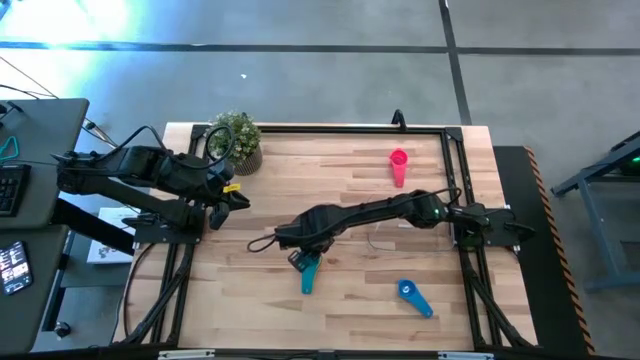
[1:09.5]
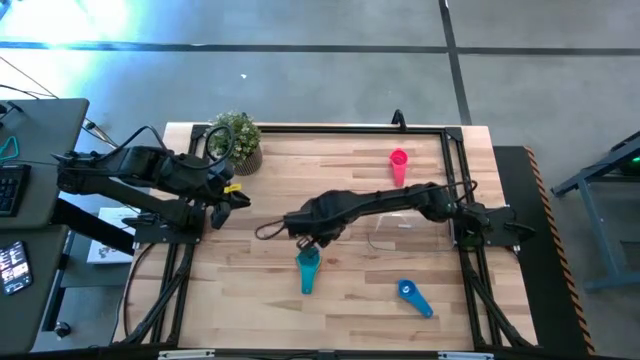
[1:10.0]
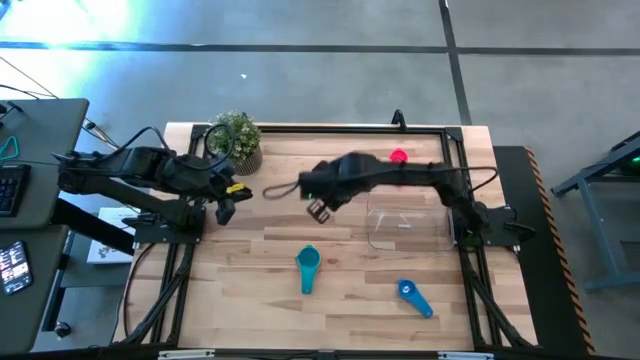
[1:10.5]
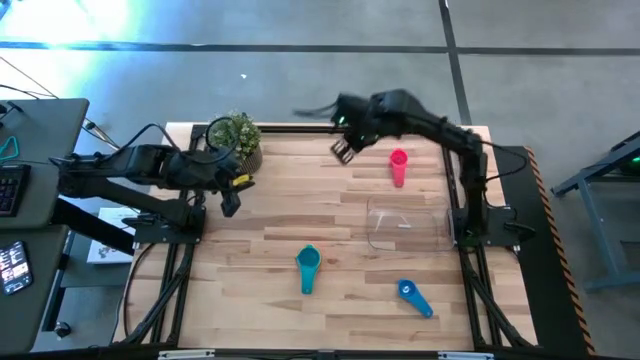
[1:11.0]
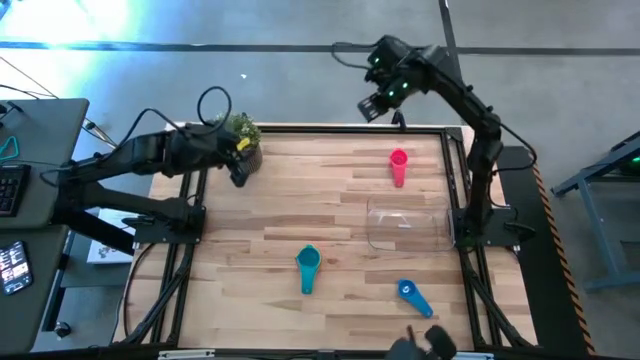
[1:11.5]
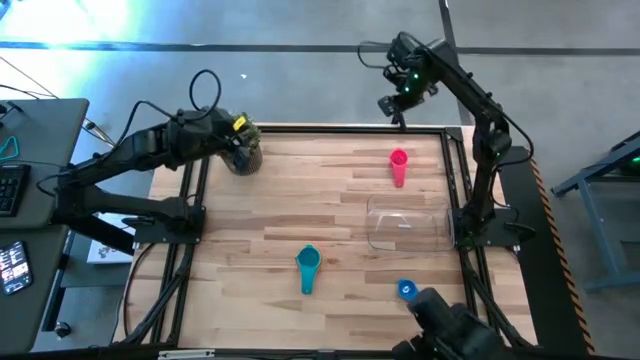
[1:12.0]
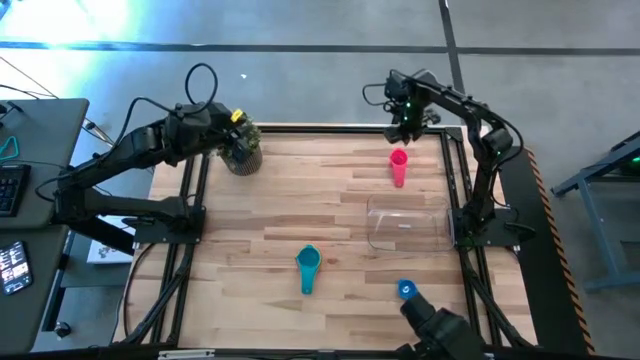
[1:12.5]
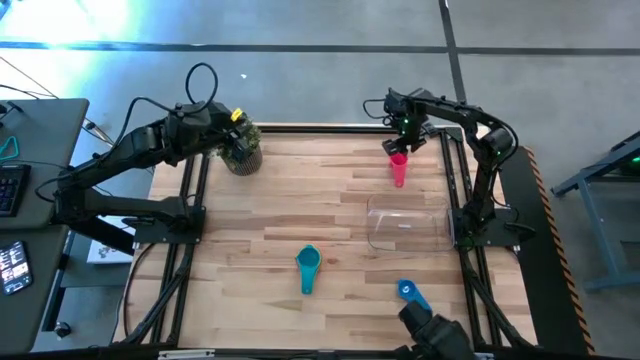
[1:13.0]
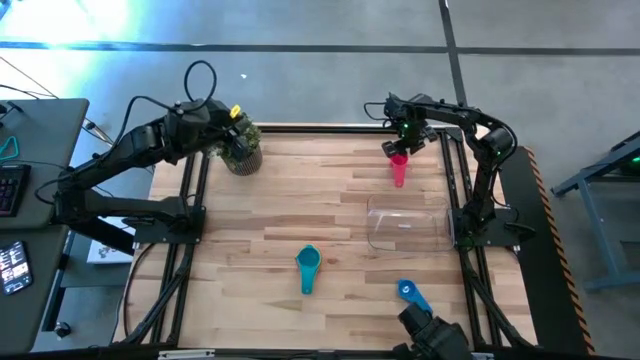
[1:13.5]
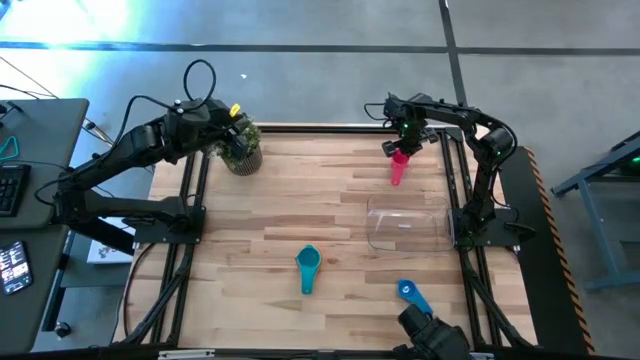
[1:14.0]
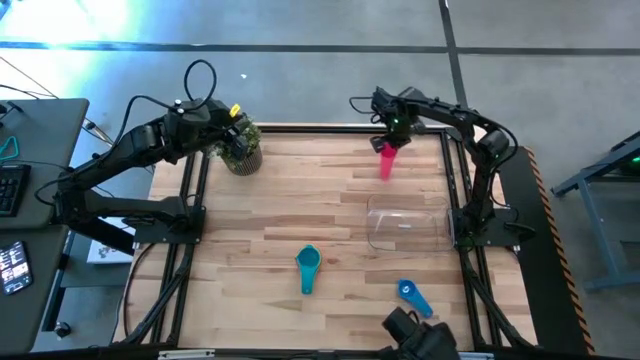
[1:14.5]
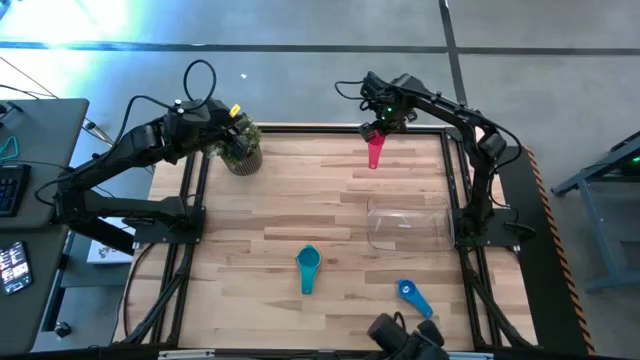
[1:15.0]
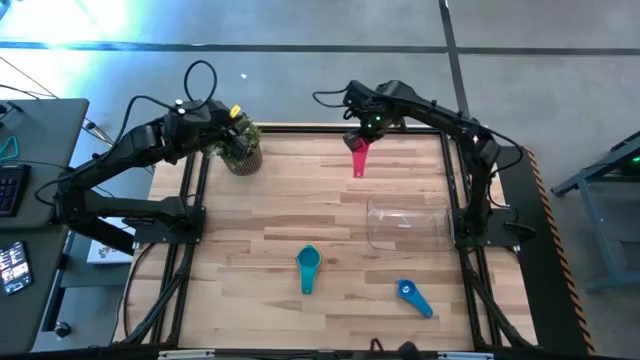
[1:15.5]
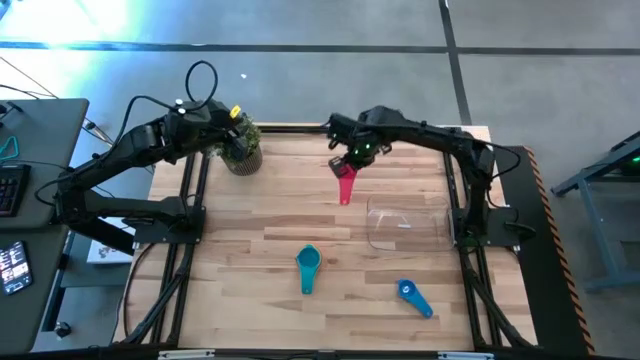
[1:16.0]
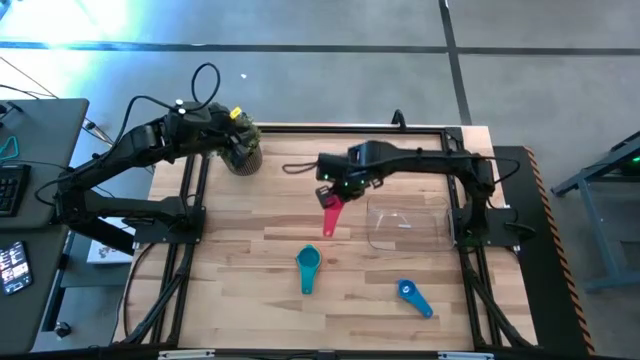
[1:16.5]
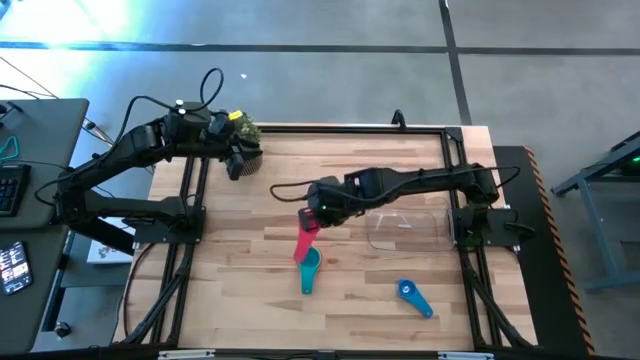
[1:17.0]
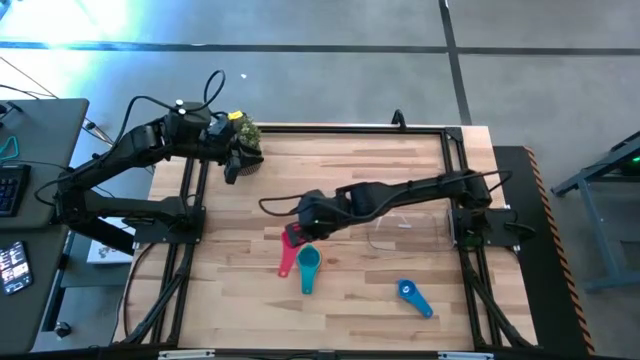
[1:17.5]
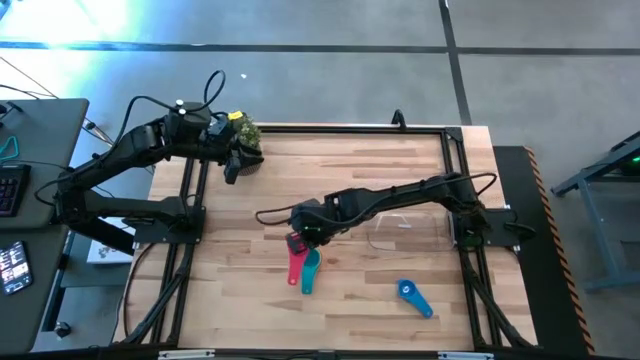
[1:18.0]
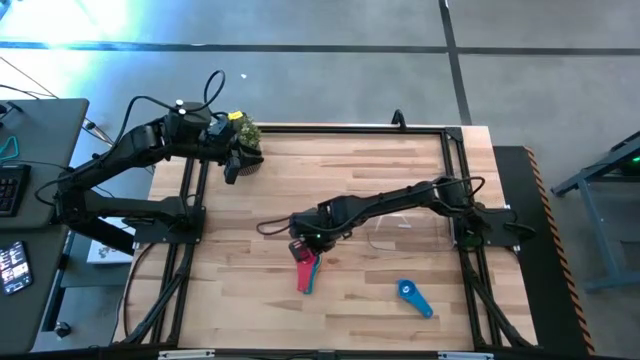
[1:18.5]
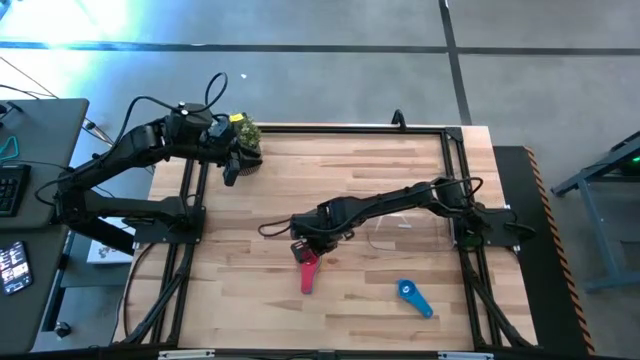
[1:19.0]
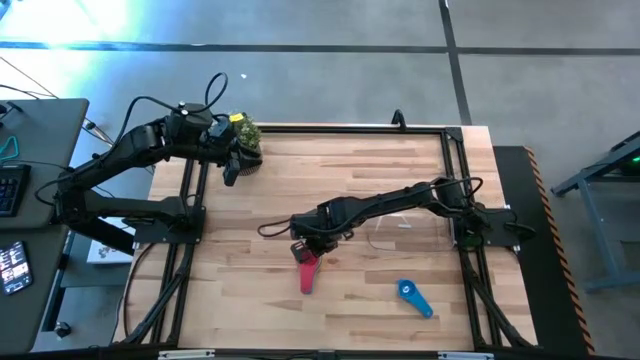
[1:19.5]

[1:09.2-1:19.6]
Task: Nest measuring cups in basket
Stack the pink measuring cup on top of the light blue measuring cup

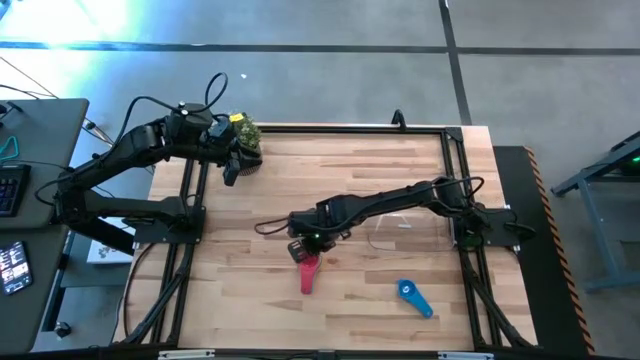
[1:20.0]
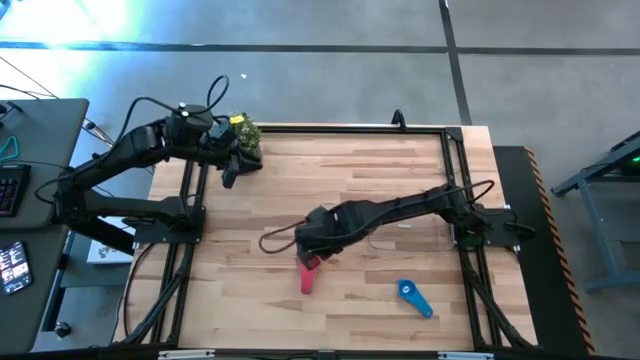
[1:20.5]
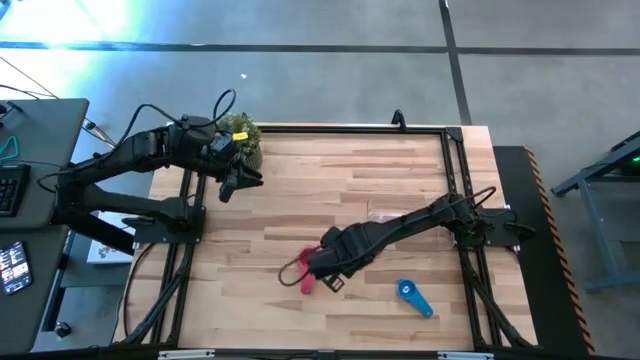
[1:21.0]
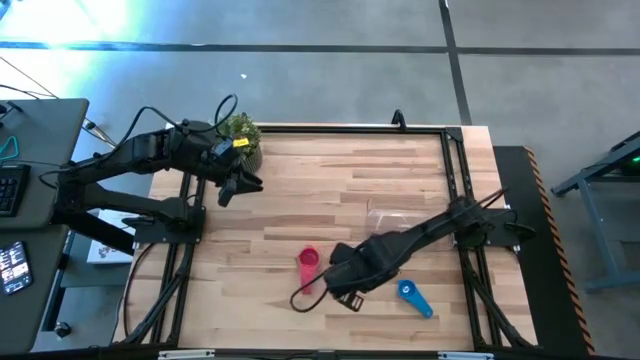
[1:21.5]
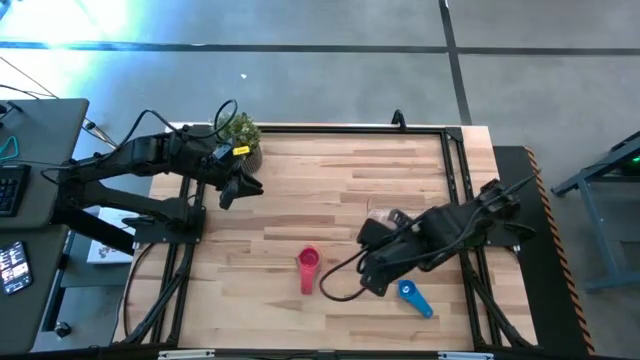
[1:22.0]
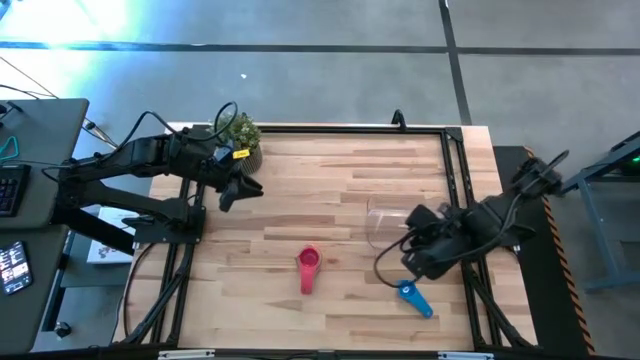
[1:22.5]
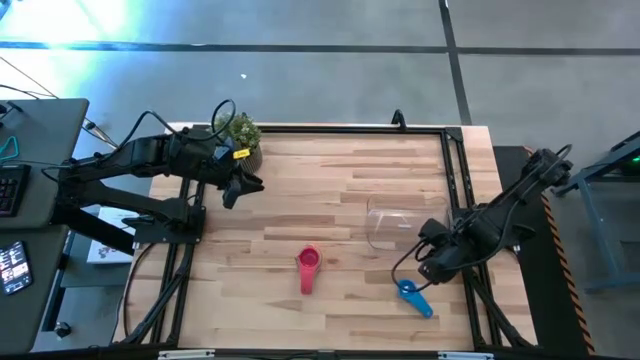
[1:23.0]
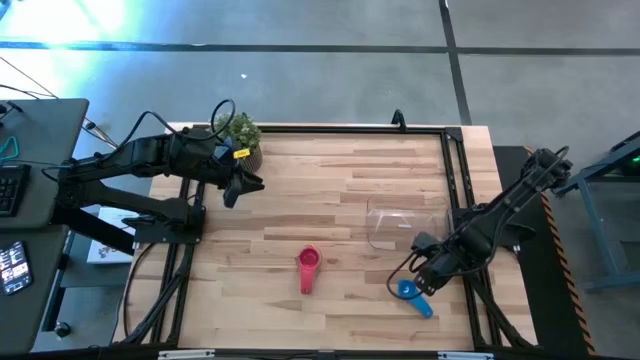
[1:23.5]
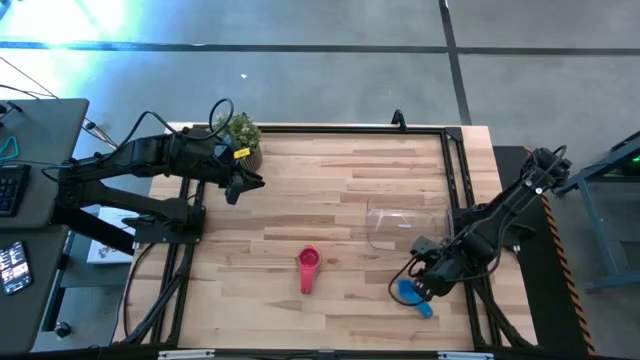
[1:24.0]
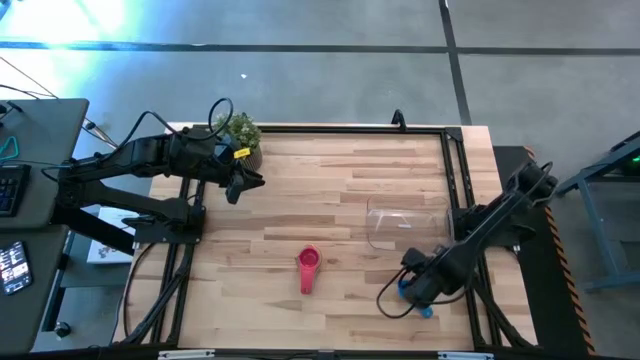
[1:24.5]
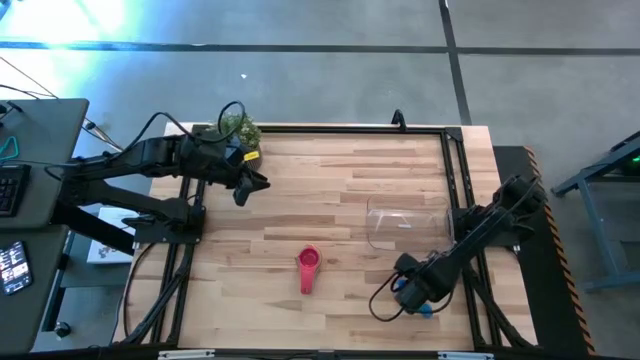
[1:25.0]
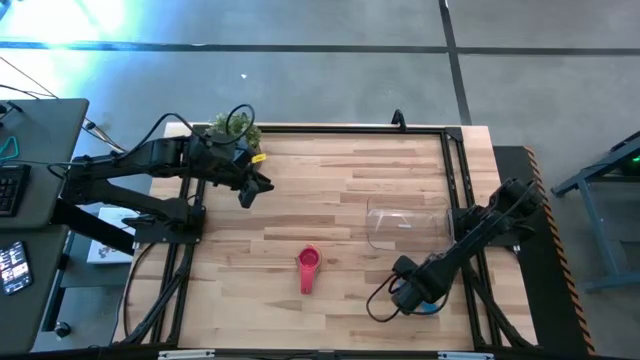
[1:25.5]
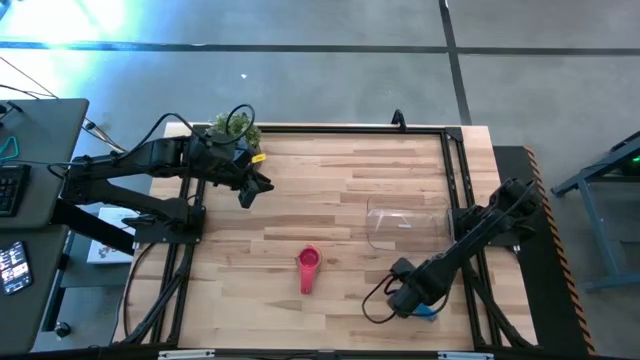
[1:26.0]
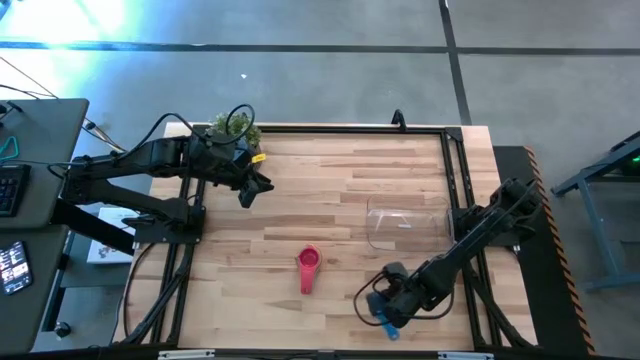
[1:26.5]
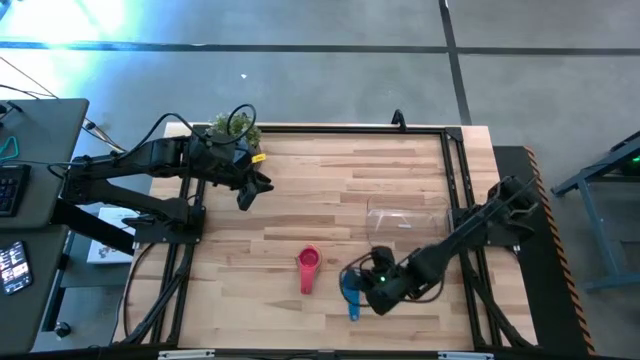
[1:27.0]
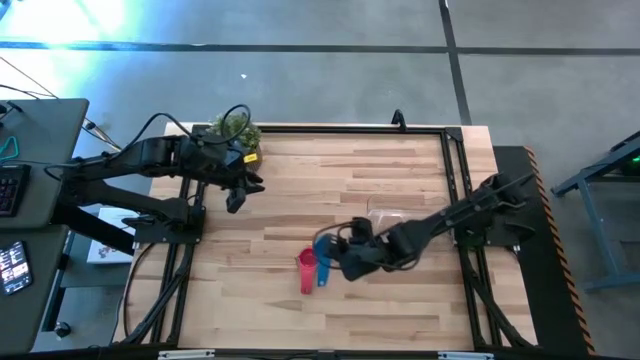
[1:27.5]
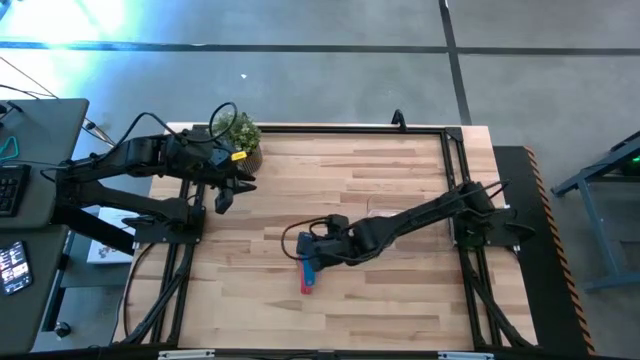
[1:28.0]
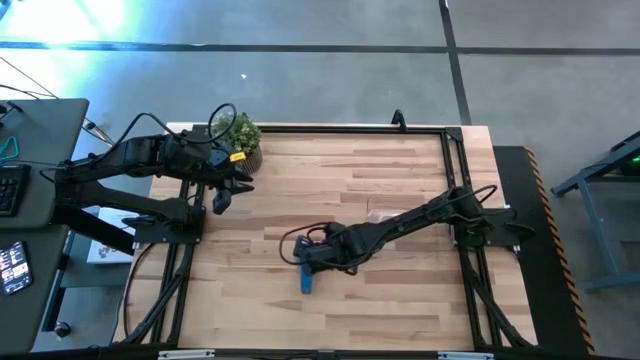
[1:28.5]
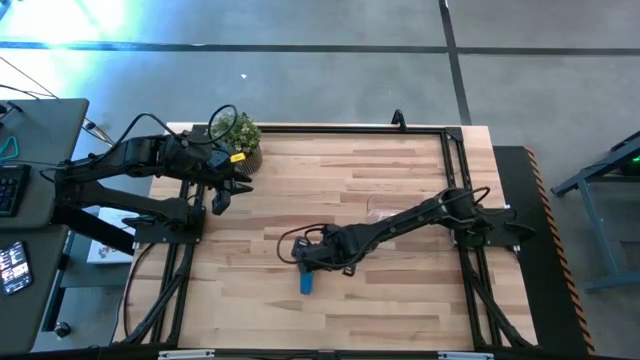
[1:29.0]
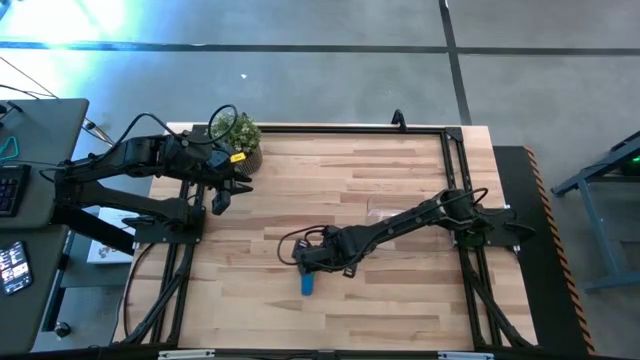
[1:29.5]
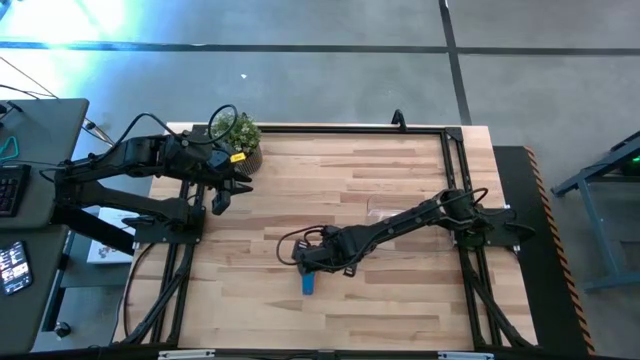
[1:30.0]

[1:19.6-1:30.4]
Stack the blue measuring cup on top of the pink measuring cup

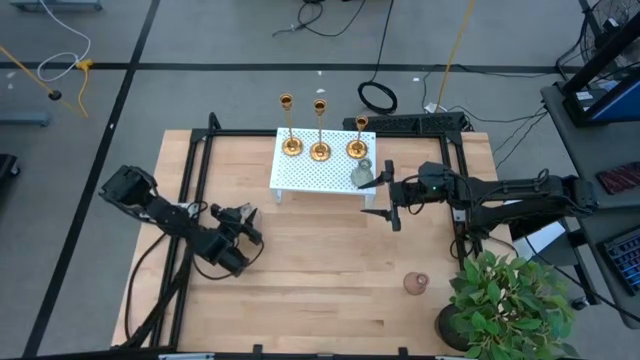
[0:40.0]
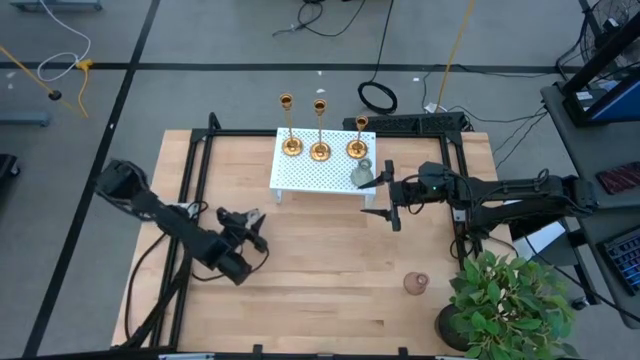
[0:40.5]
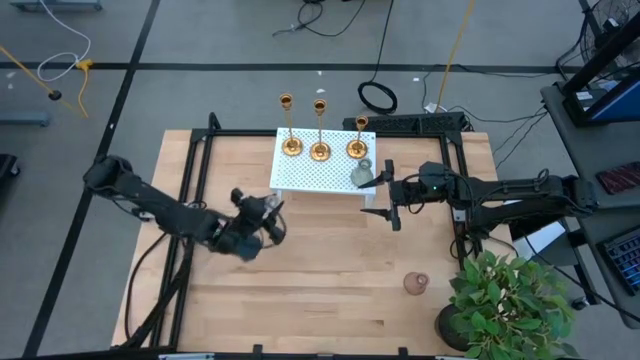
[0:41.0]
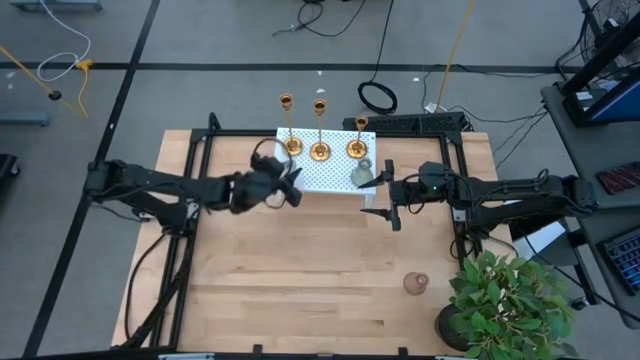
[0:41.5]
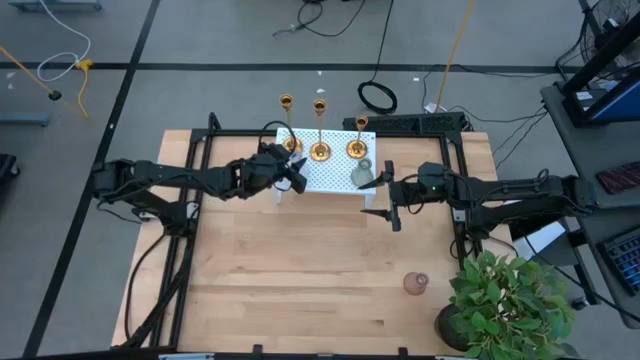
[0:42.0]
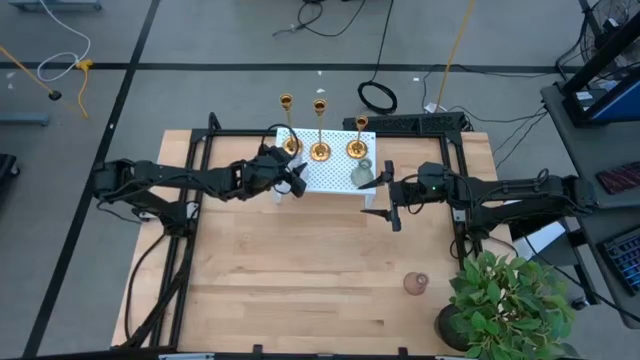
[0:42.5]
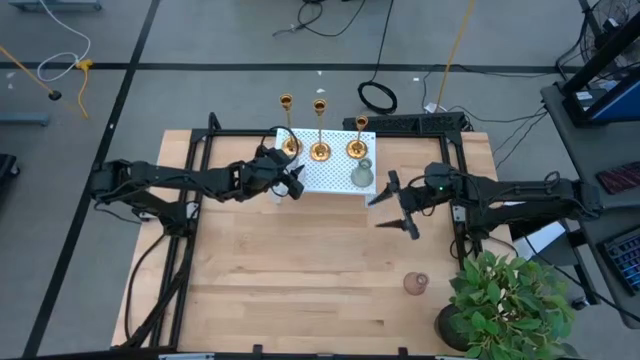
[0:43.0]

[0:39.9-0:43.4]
Task: Pick & Place candle stick holders
Put the transparent vase on the shelf
